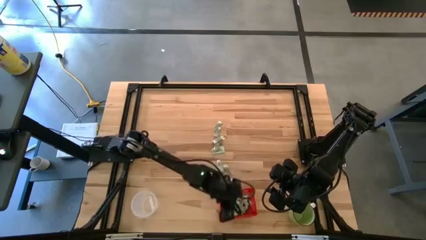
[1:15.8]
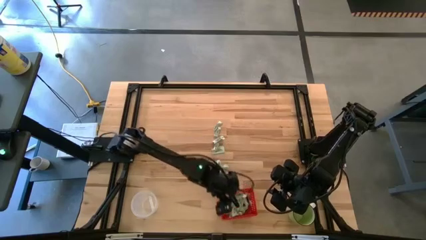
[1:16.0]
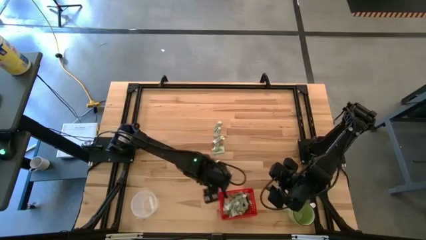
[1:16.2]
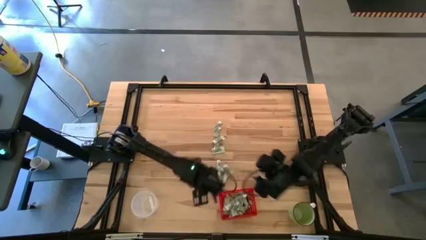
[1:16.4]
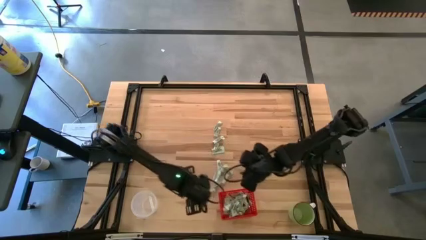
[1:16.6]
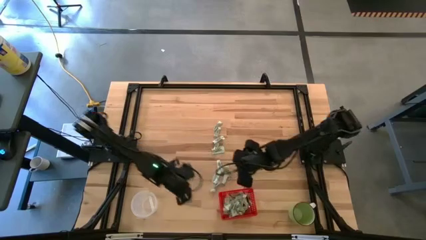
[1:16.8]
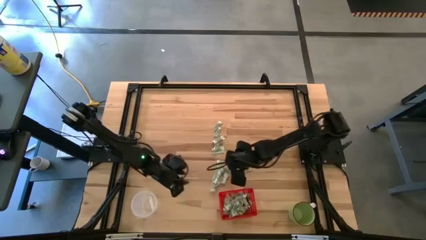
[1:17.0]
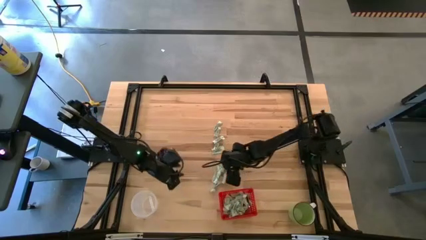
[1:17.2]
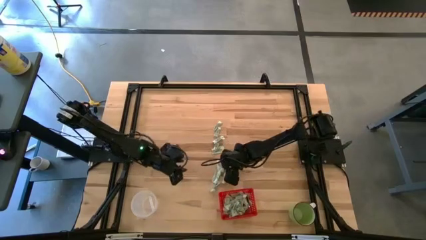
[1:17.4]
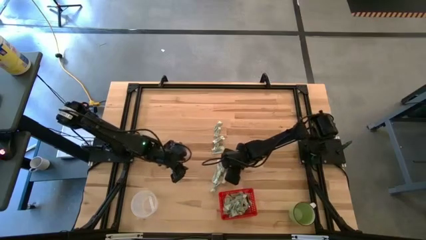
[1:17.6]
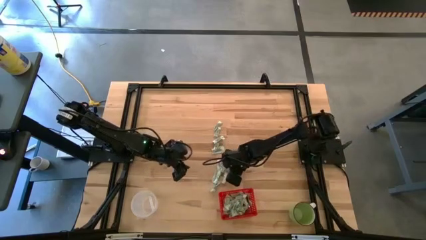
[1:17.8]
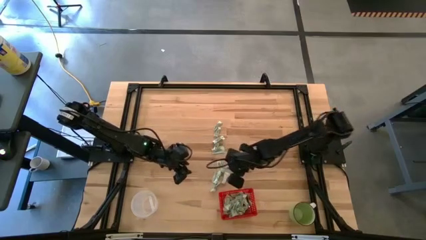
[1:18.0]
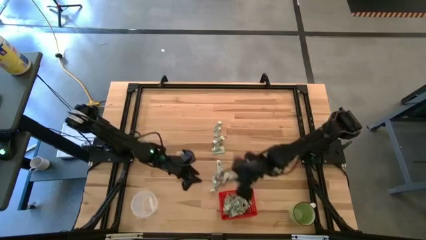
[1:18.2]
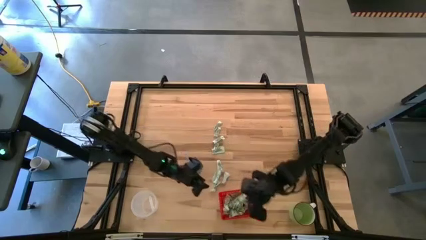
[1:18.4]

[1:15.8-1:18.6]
Task: Pick and place items into bin
Put the white stevia packet into the red bin

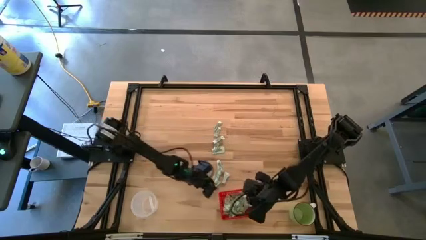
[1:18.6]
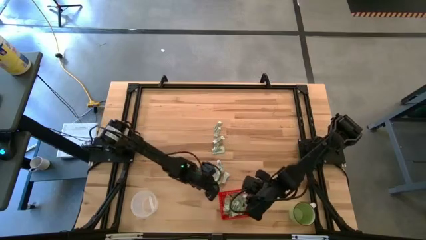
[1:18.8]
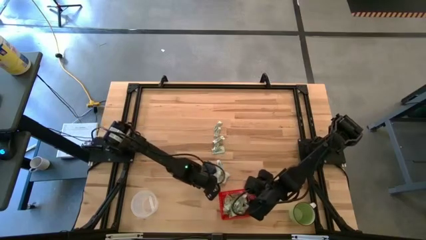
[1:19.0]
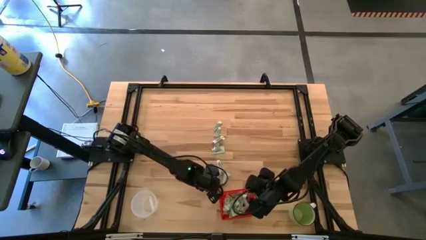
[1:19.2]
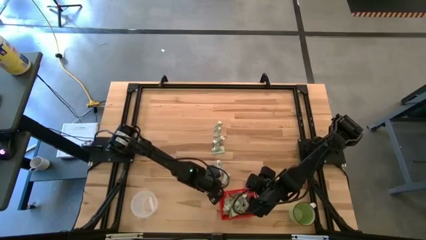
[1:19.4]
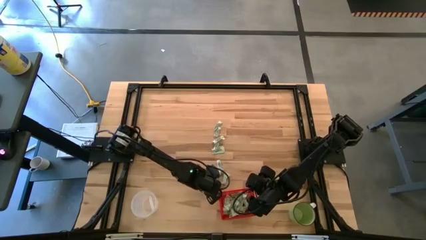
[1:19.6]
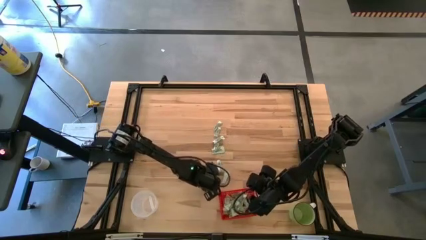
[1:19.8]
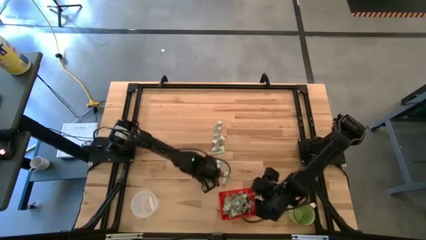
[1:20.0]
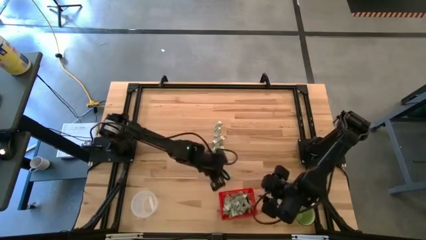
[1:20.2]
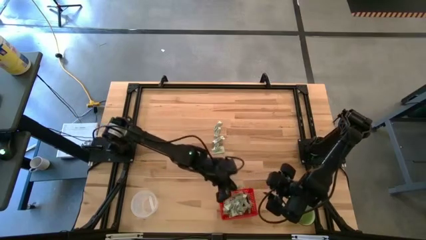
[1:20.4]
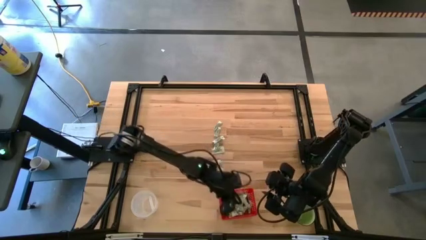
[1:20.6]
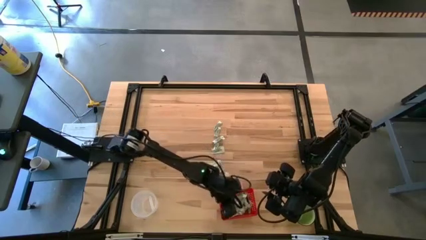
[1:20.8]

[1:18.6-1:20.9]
Put the white stevia packet into the red bin

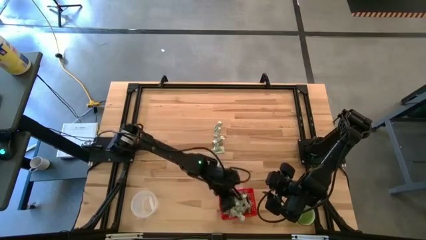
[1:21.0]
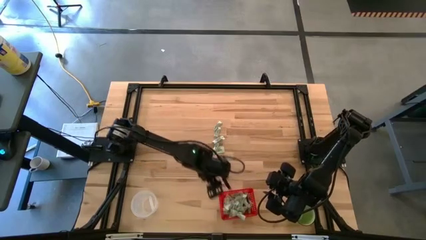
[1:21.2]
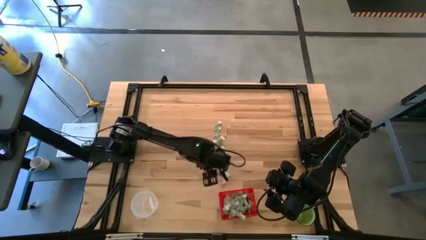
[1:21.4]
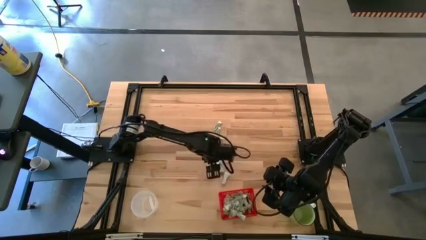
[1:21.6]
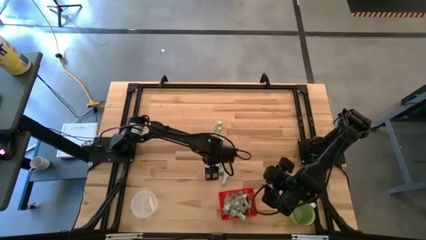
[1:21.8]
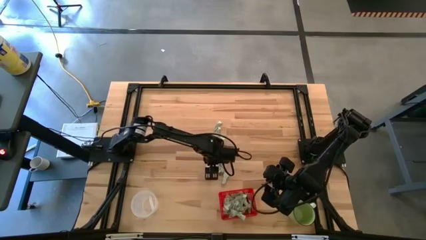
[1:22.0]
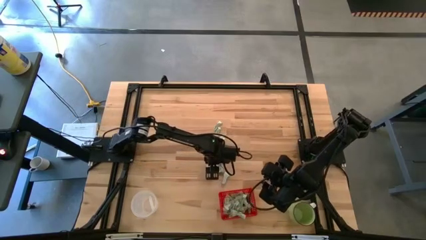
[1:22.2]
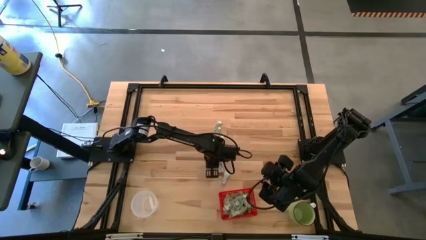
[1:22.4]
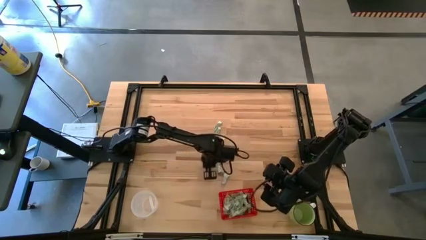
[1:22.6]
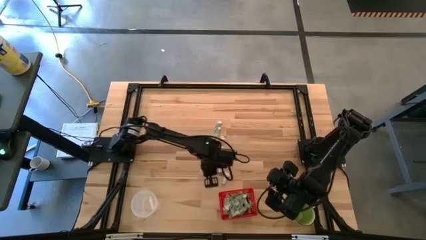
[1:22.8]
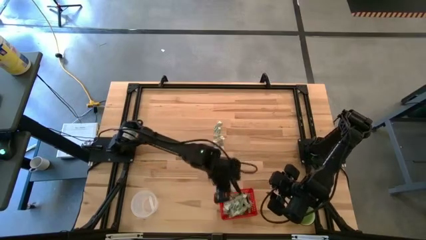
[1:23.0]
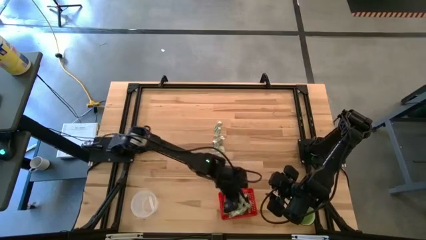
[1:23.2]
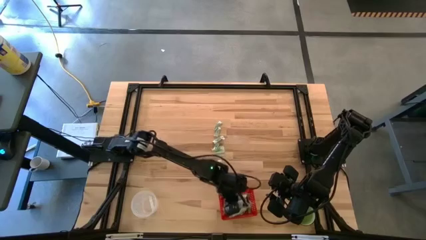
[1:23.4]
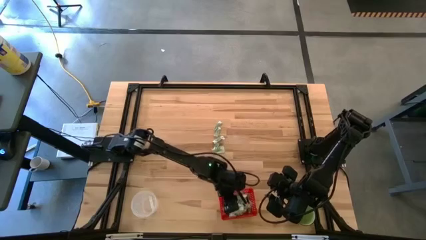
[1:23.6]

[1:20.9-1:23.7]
Put the white stevia packet into the red bin

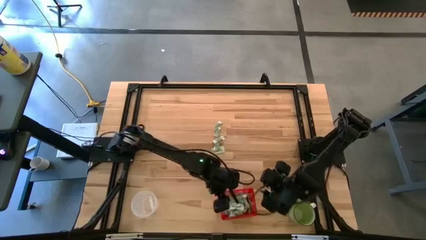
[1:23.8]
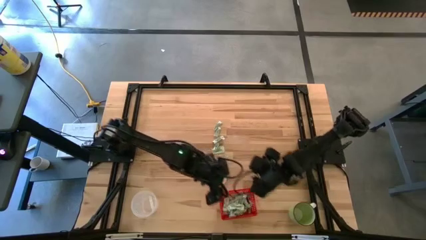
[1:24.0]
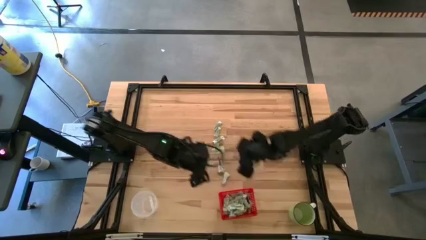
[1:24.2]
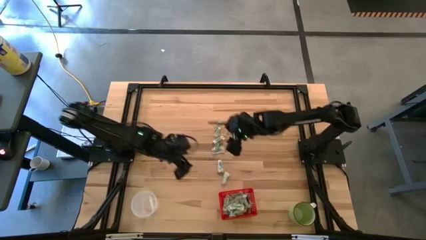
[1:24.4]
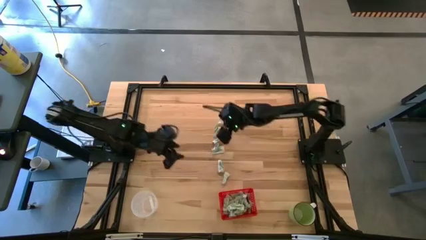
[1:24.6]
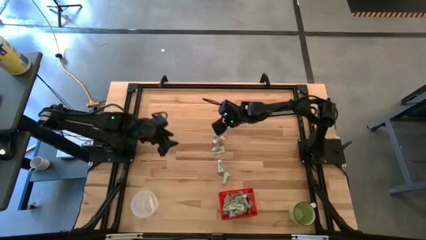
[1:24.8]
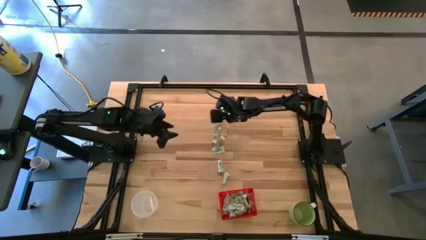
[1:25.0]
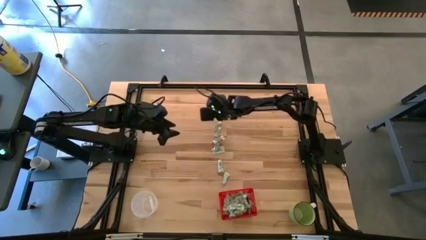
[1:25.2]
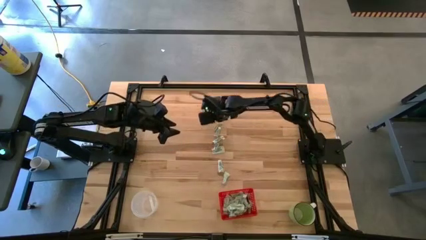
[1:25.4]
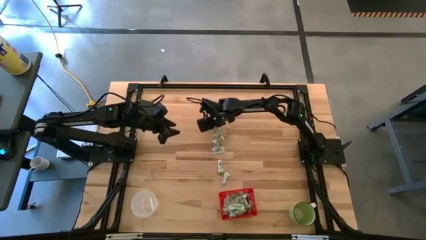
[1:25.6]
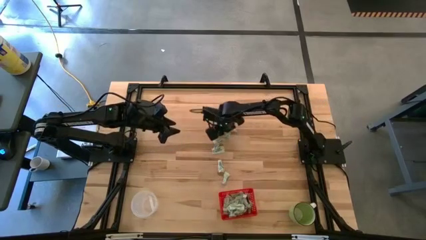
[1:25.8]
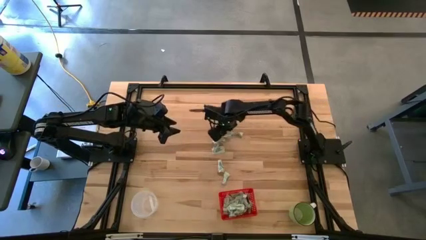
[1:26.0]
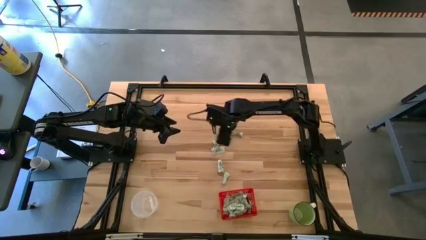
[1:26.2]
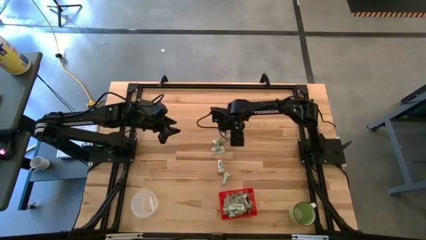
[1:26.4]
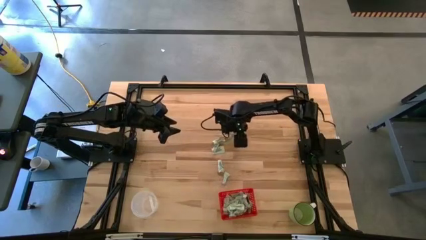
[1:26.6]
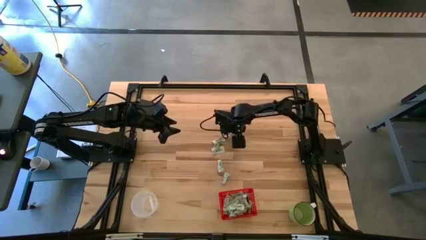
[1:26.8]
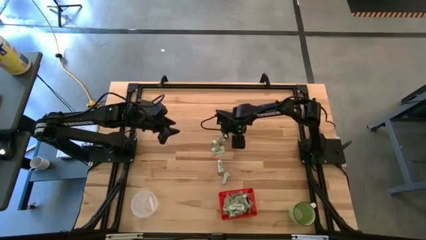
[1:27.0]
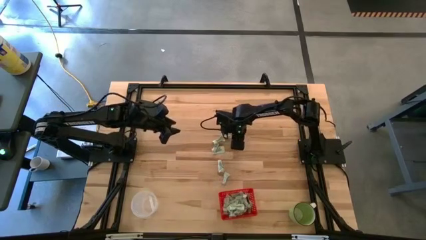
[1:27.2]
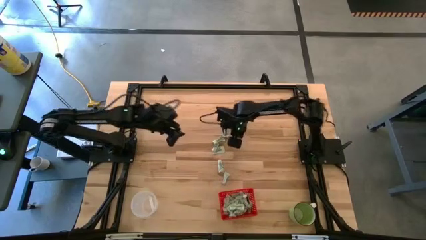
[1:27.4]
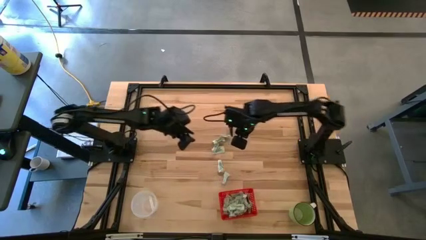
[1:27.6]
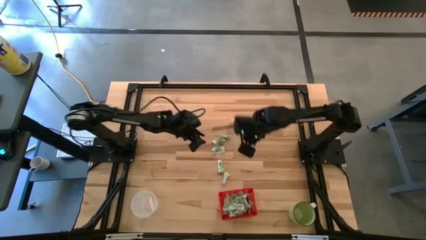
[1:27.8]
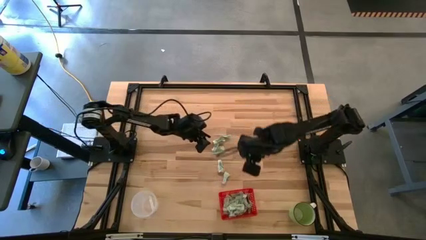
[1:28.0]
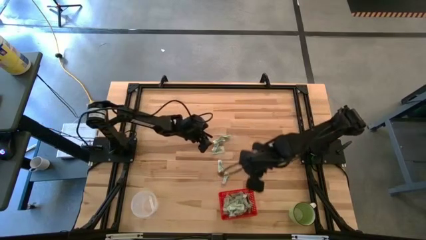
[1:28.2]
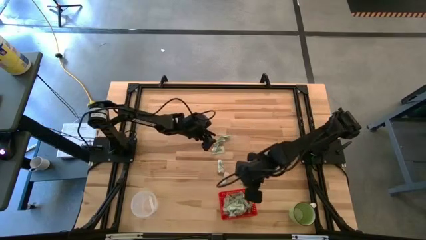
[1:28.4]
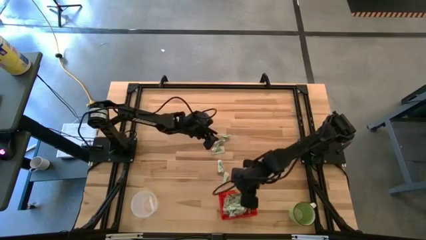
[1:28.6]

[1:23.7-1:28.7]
Put the white stevia packet into the red bin

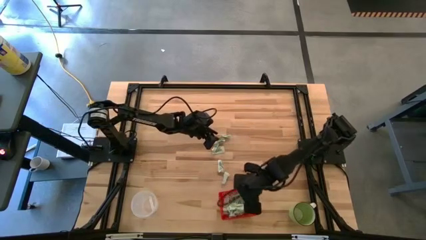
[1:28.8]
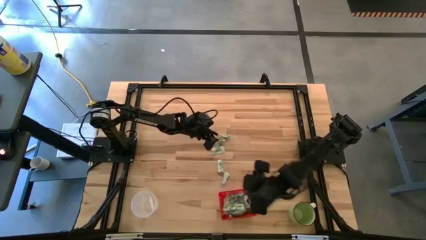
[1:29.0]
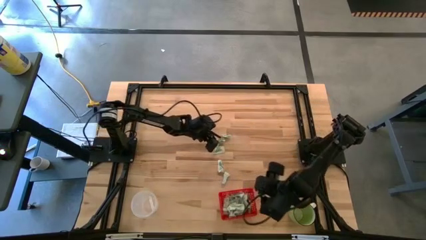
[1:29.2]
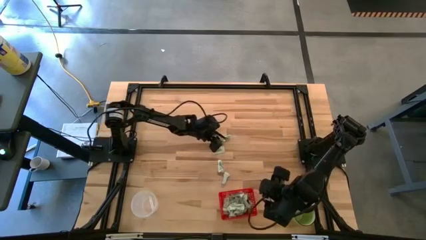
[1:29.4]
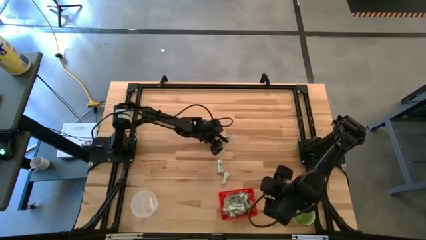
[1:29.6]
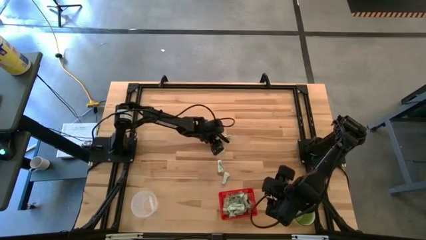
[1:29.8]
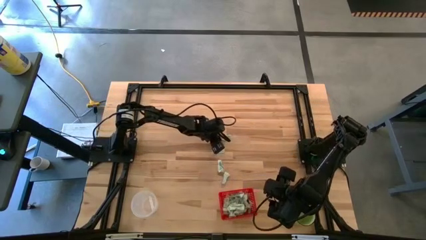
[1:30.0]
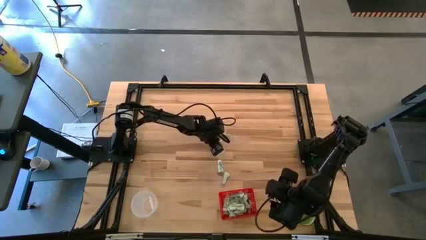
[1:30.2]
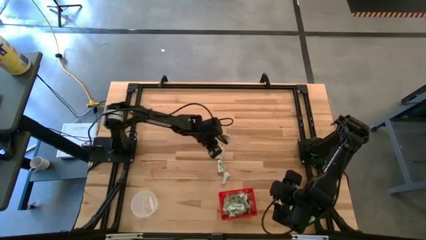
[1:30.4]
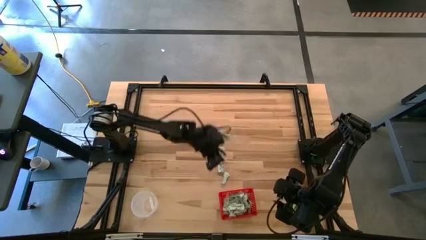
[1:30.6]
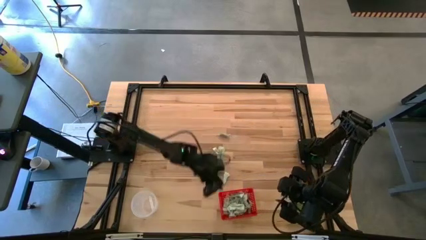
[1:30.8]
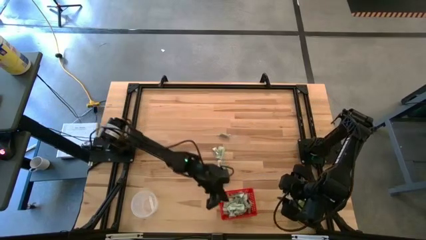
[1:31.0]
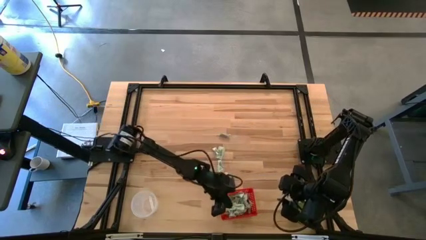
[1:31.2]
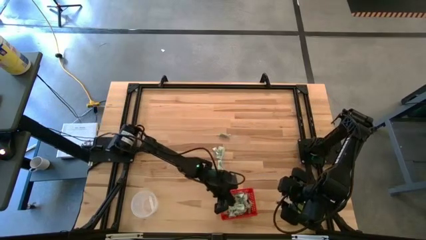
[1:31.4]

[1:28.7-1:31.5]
Put the white stevia packet into the red bin
